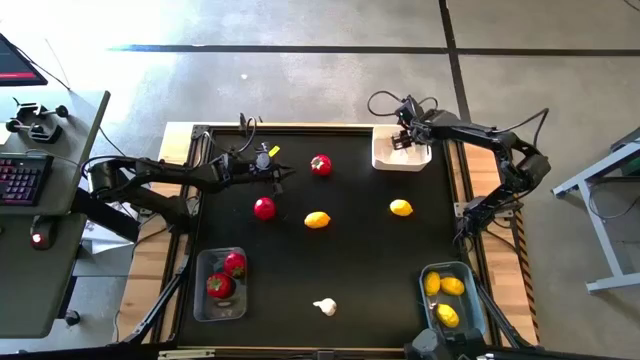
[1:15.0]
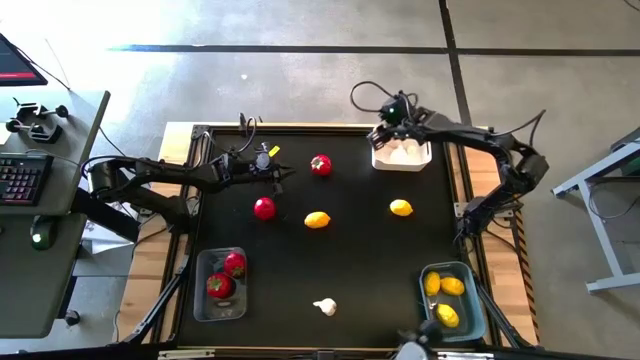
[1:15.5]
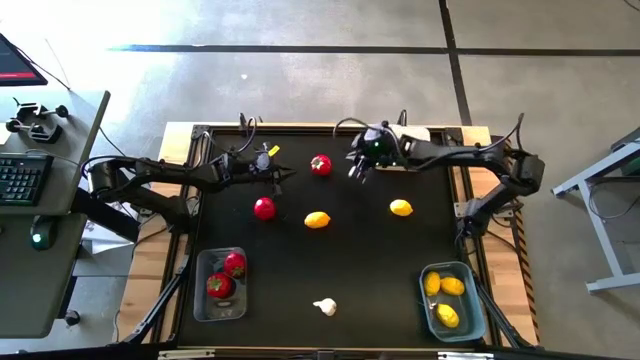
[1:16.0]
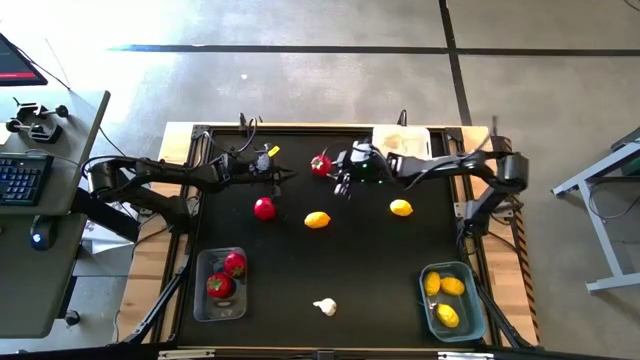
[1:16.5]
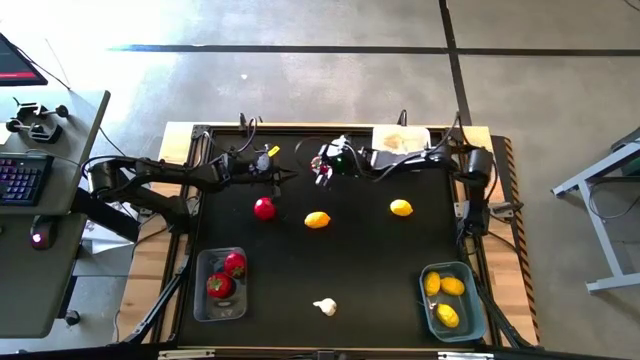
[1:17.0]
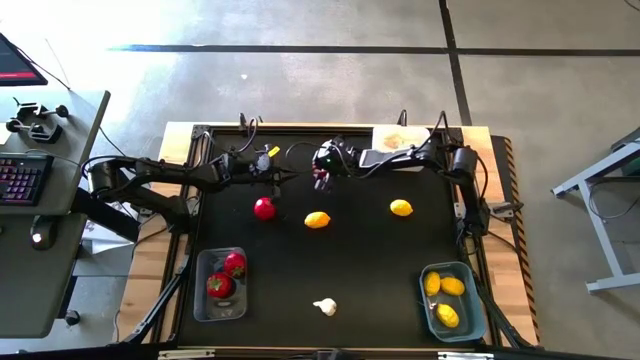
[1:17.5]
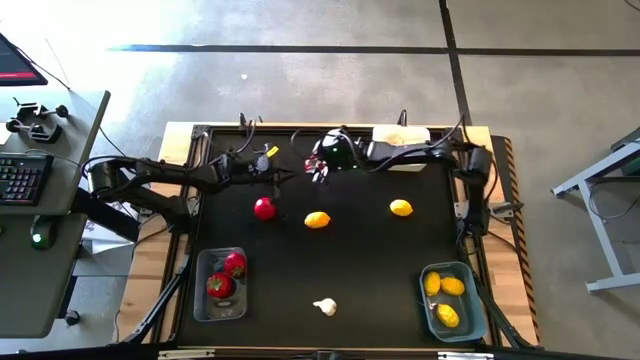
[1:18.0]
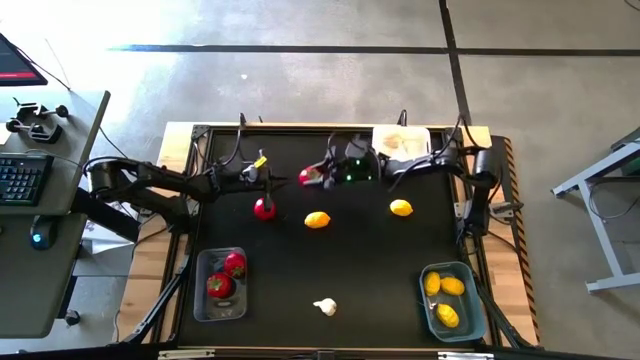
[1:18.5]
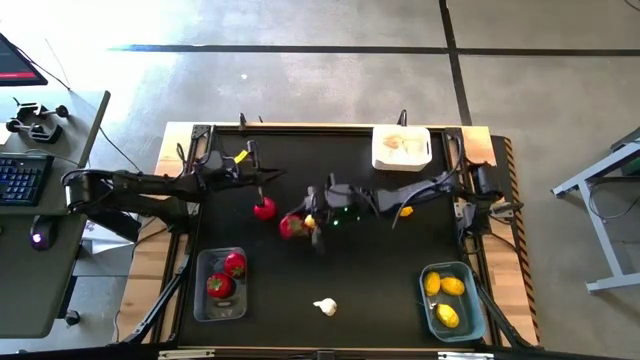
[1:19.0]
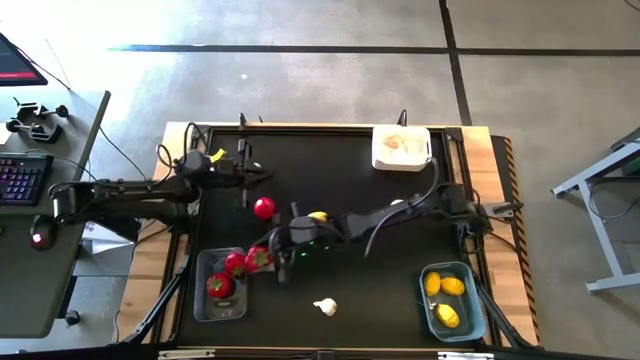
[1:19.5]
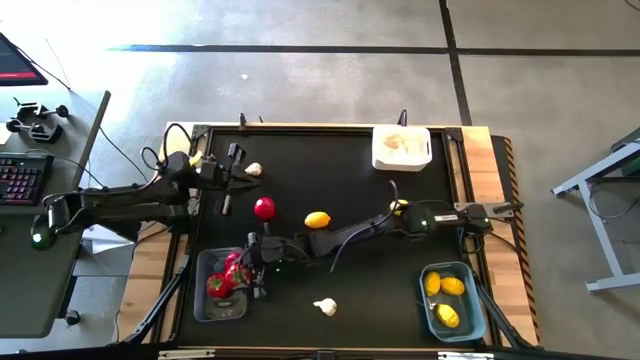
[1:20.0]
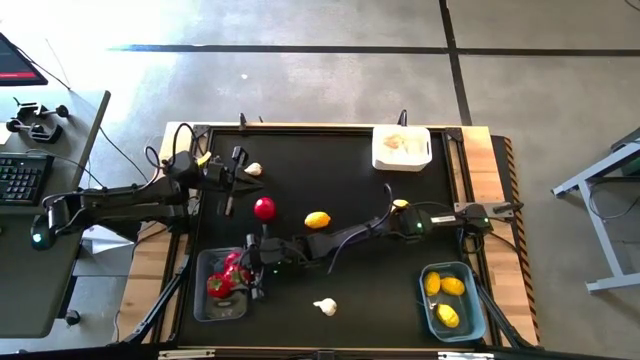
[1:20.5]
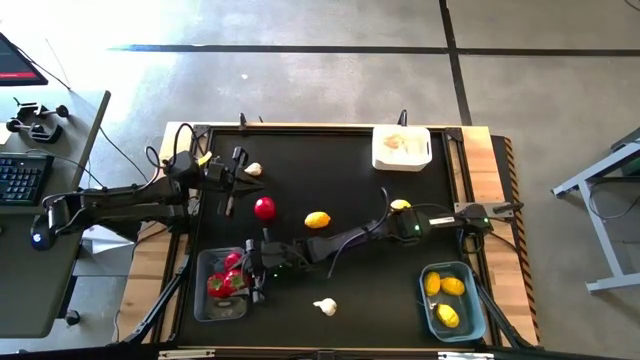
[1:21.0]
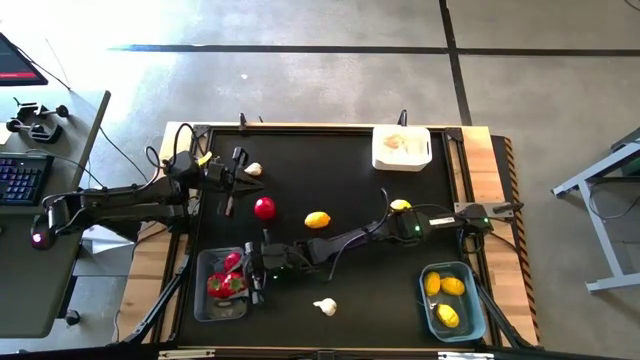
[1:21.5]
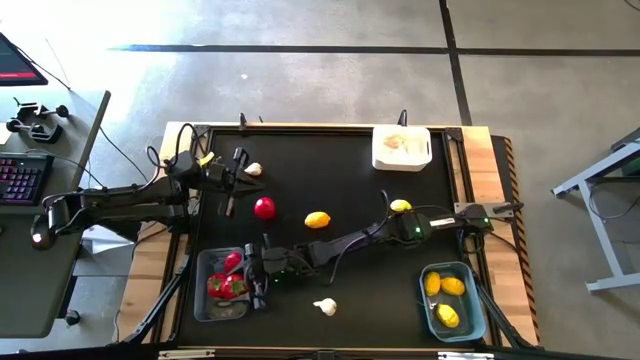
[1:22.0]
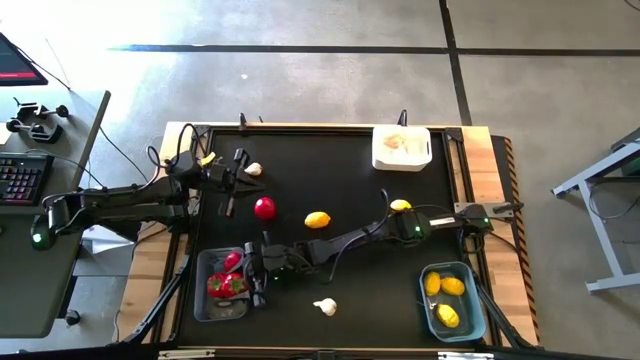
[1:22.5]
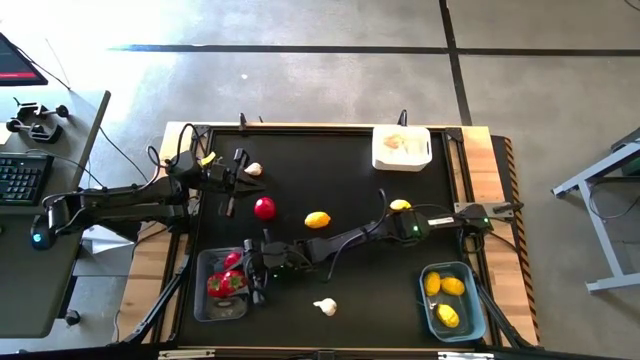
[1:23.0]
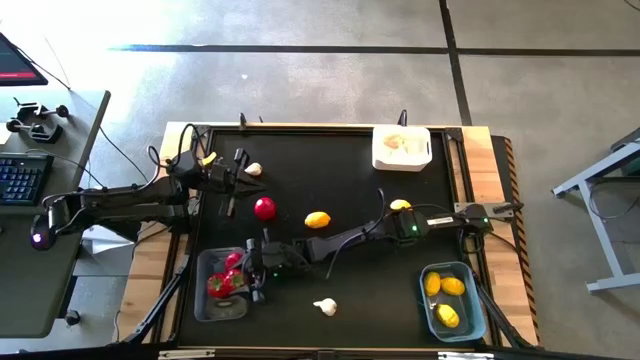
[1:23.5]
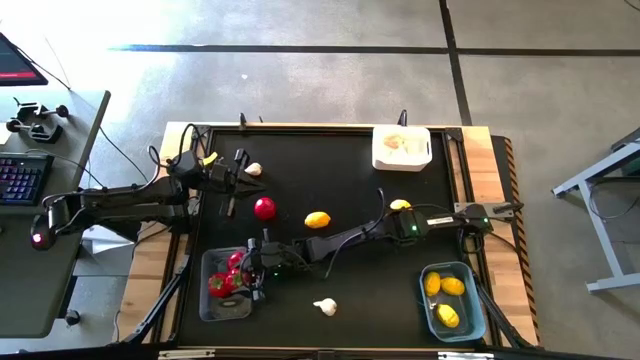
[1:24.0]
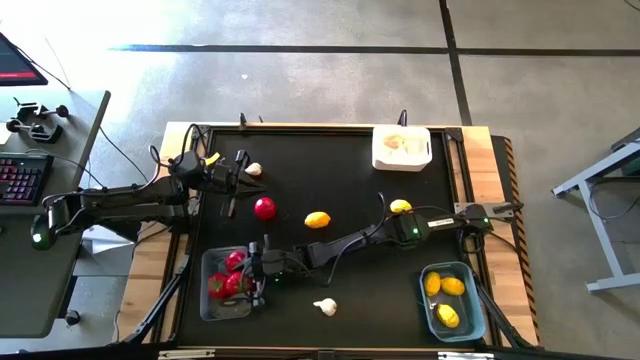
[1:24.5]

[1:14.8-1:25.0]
Task: Sort produce into baskets
Put the tomato into the transparent bin

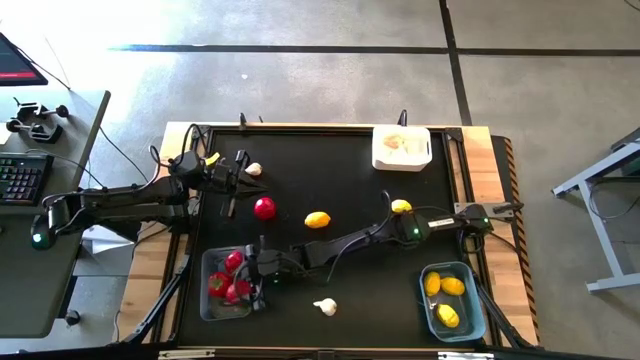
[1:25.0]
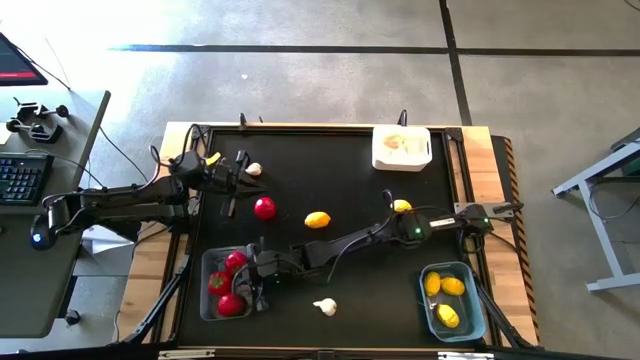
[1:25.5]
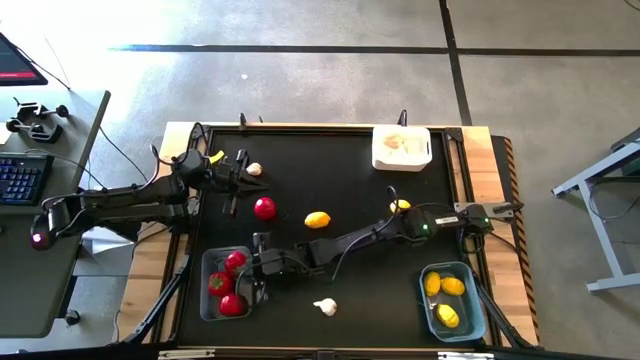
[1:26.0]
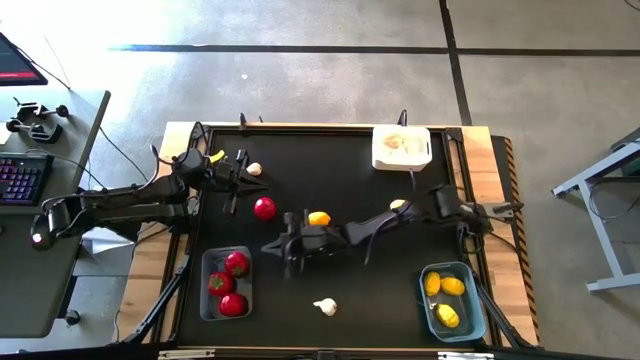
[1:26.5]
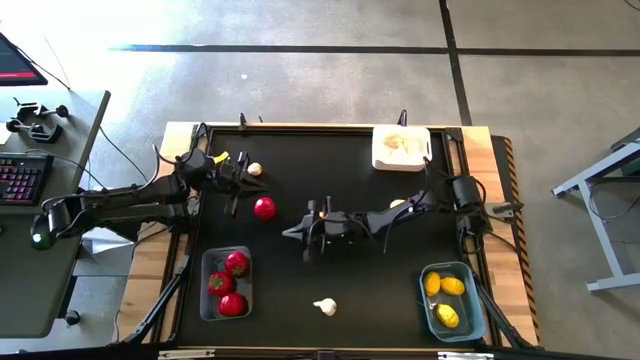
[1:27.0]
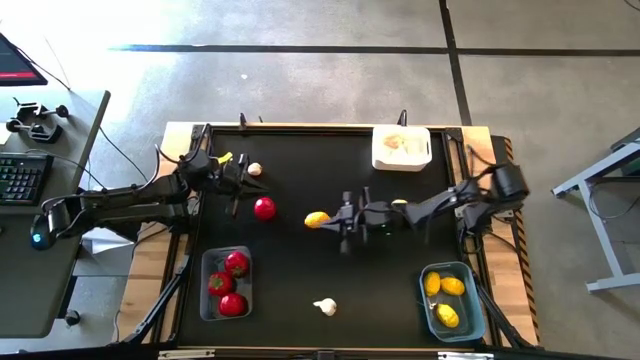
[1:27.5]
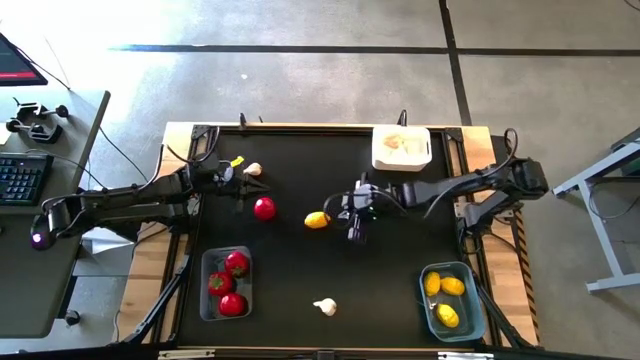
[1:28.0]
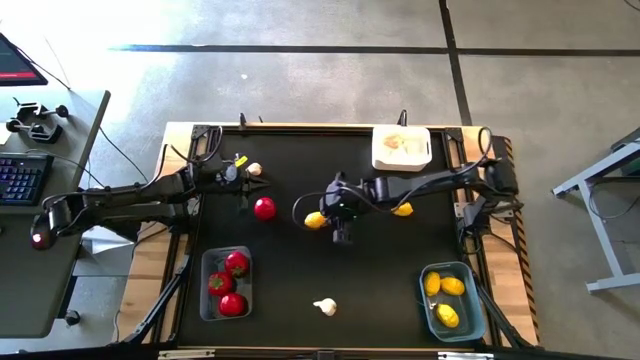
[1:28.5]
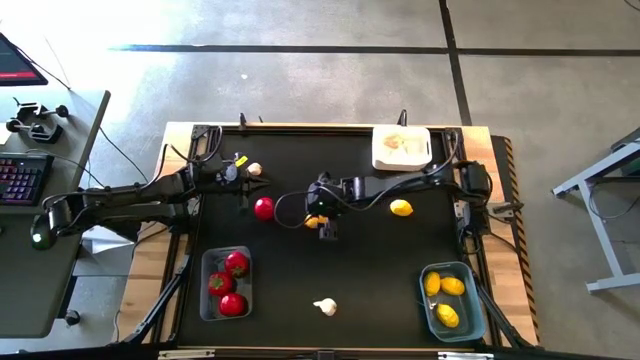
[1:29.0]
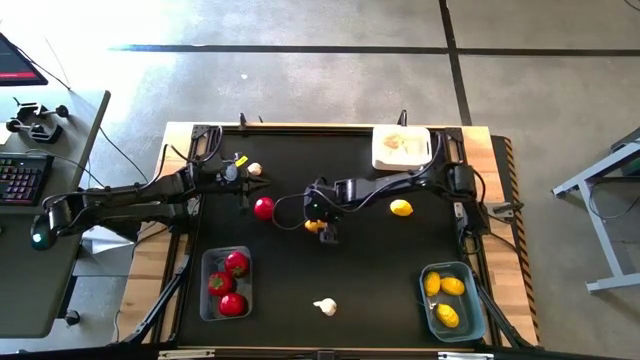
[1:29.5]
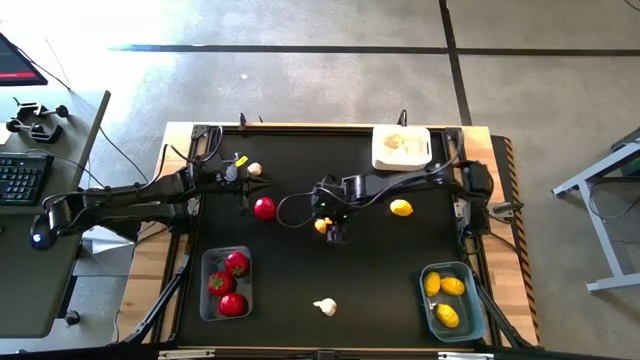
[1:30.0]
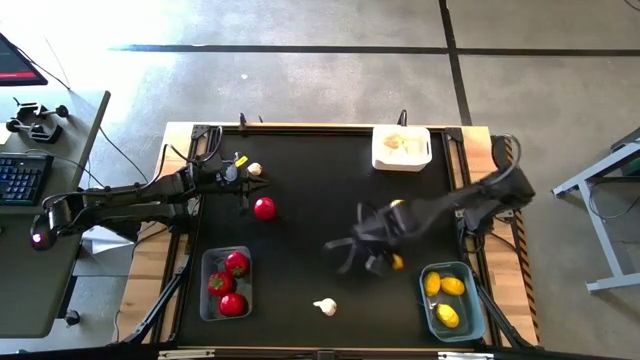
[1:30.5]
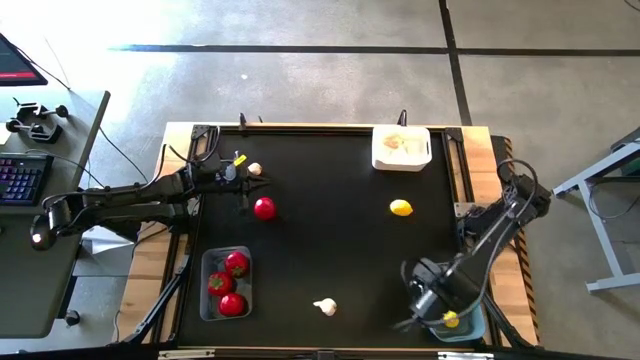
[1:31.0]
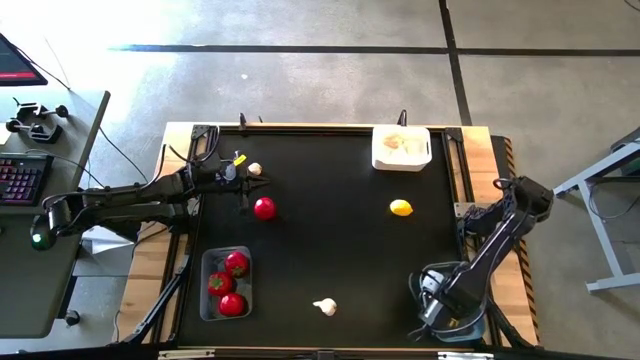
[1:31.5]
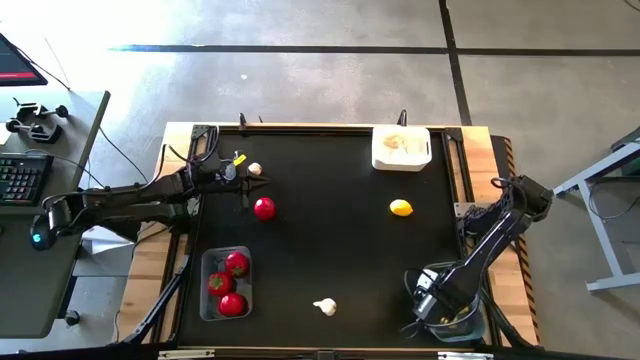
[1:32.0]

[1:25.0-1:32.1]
Put the lemon into the blue bin

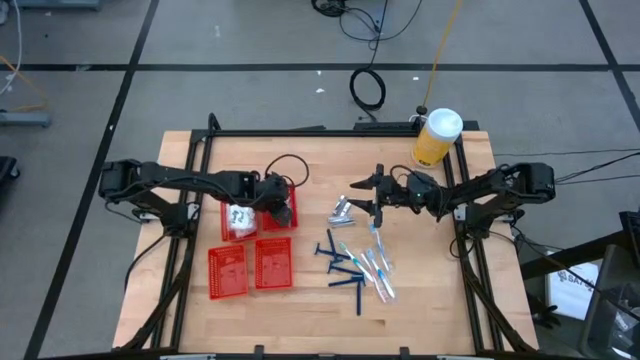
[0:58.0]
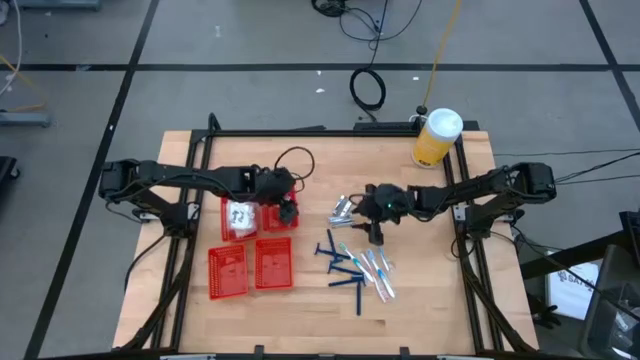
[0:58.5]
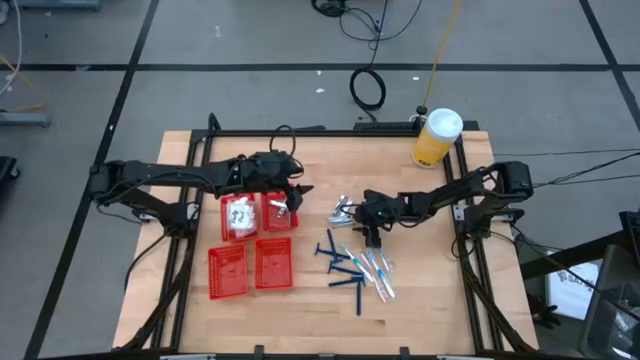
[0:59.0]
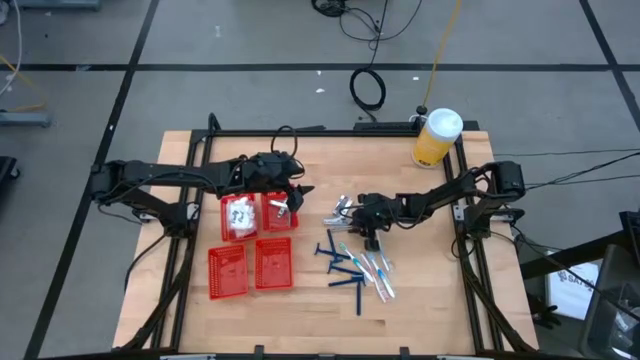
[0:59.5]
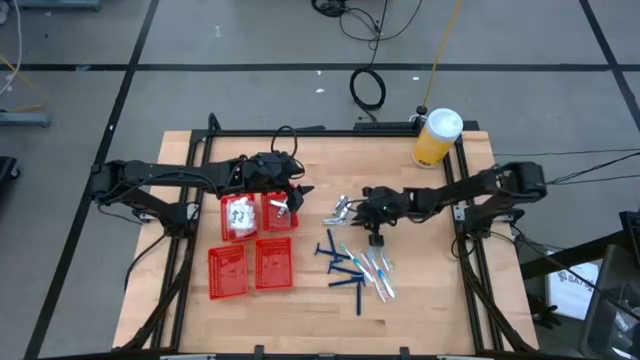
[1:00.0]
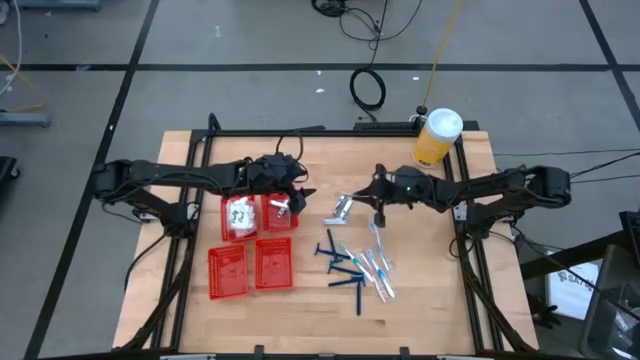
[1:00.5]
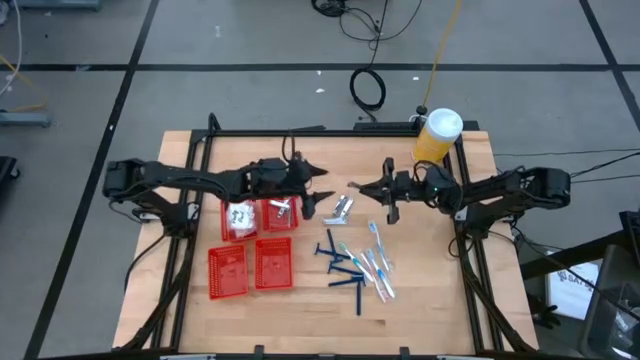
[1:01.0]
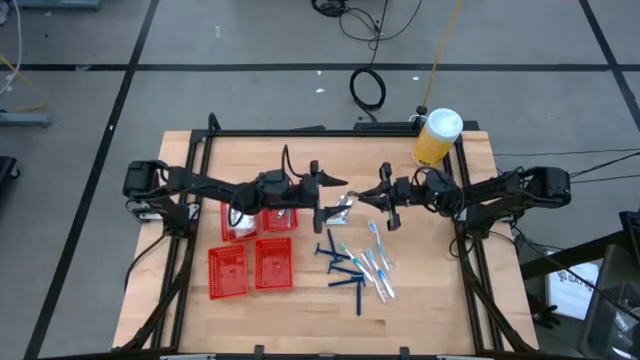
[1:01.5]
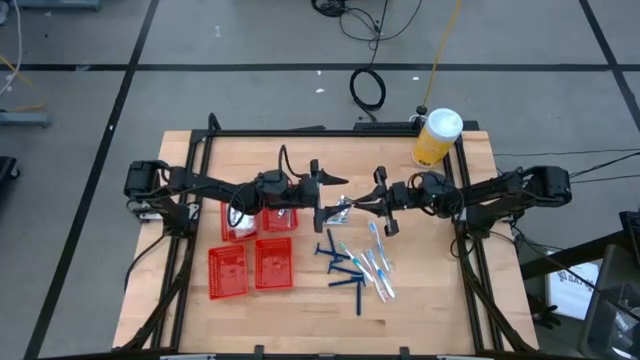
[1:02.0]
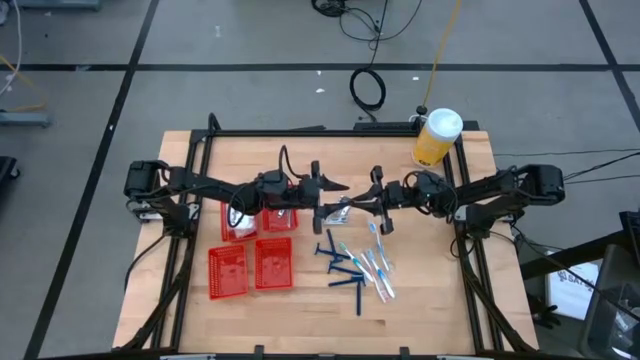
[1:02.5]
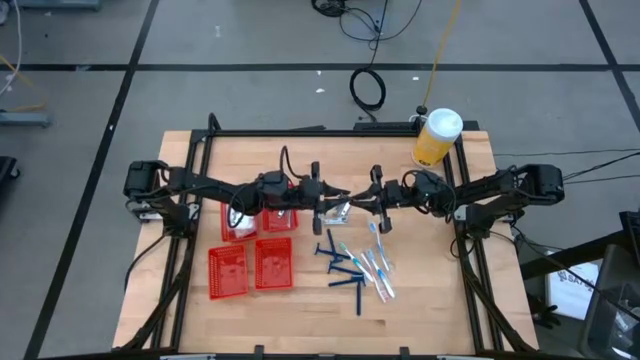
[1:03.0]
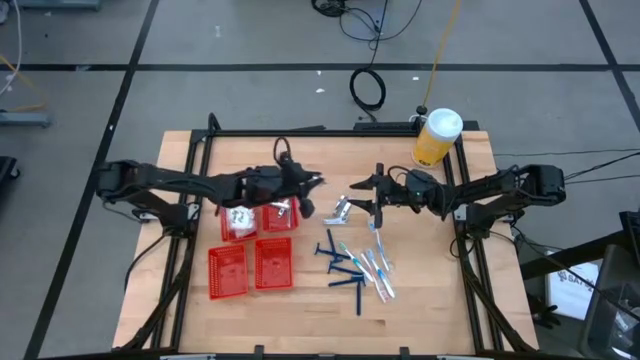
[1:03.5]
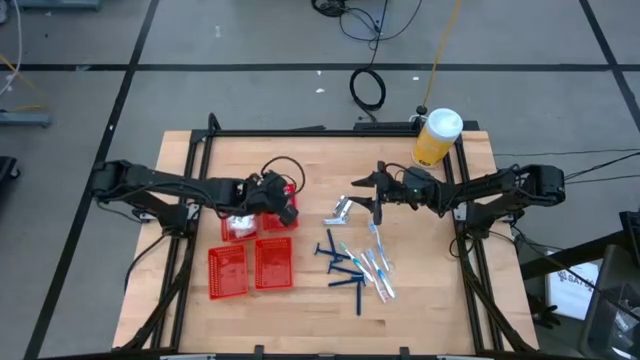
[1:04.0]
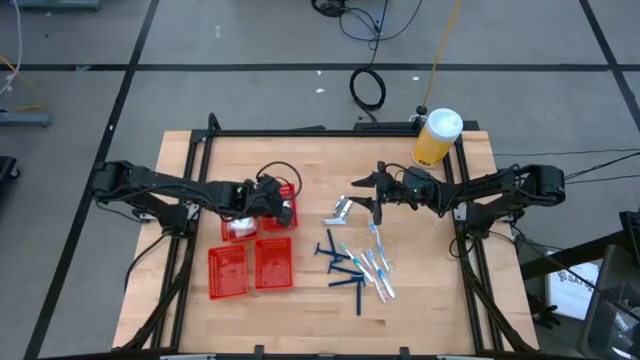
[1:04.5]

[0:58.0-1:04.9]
Task: Pick & Place Travel size toiletries
Put the silver nail cutter into the top right red basket
